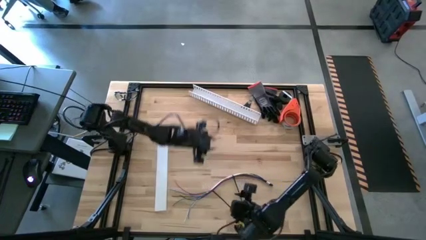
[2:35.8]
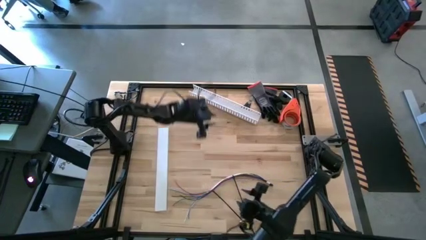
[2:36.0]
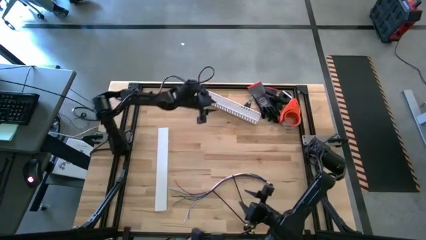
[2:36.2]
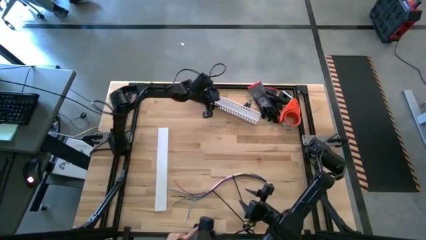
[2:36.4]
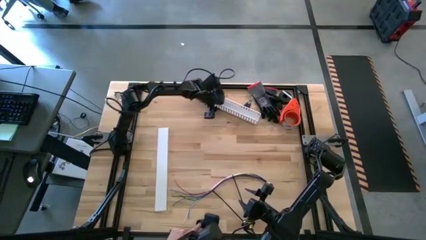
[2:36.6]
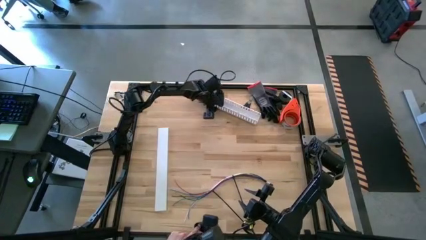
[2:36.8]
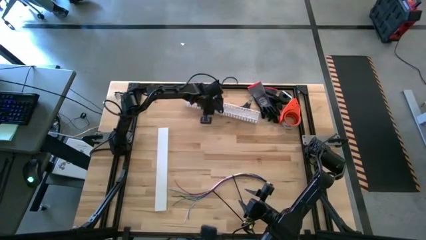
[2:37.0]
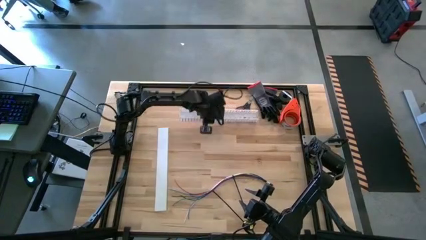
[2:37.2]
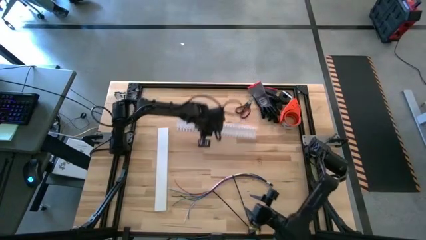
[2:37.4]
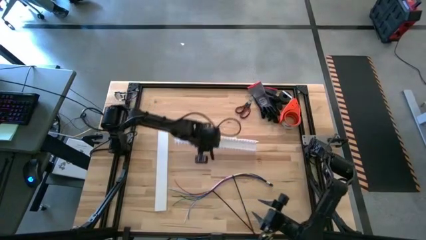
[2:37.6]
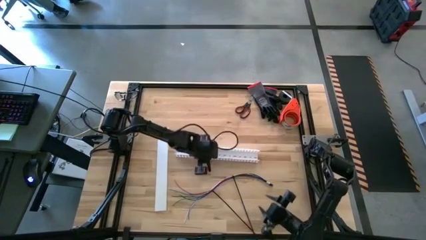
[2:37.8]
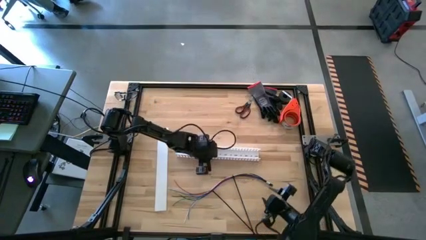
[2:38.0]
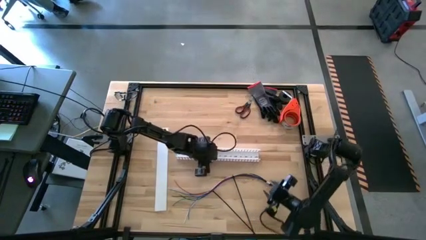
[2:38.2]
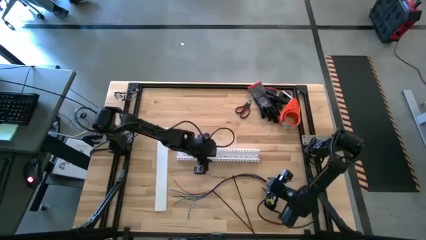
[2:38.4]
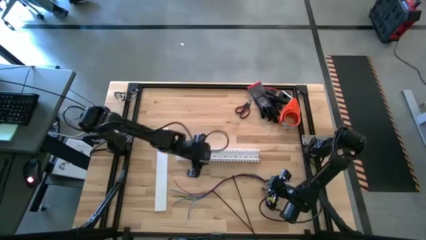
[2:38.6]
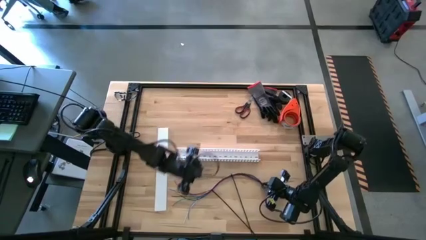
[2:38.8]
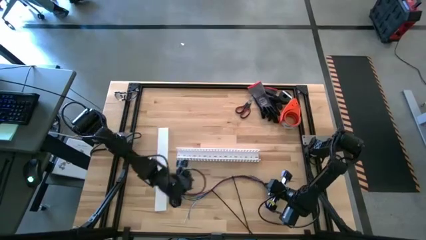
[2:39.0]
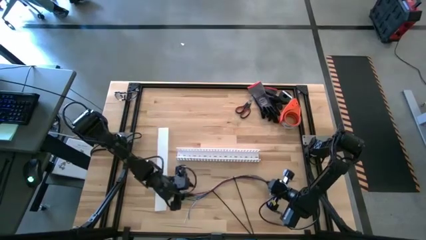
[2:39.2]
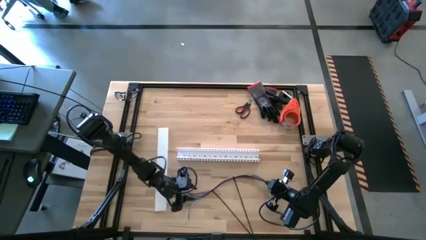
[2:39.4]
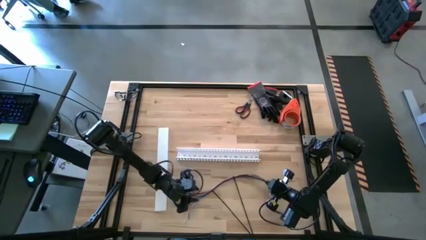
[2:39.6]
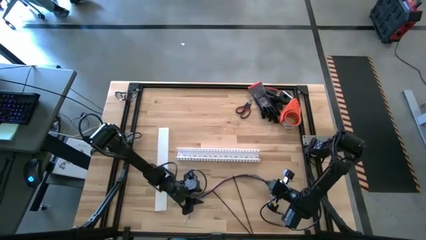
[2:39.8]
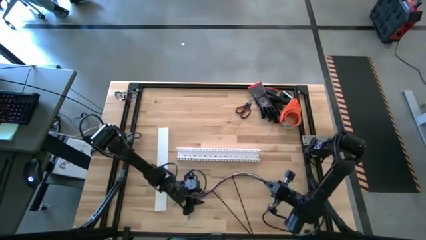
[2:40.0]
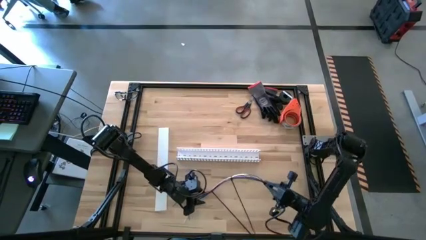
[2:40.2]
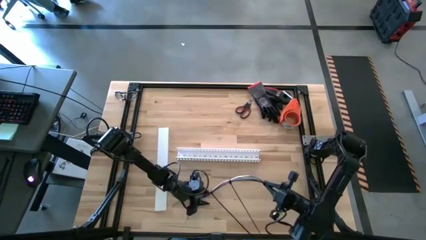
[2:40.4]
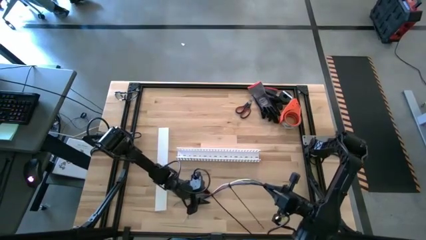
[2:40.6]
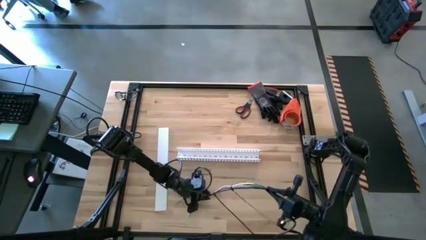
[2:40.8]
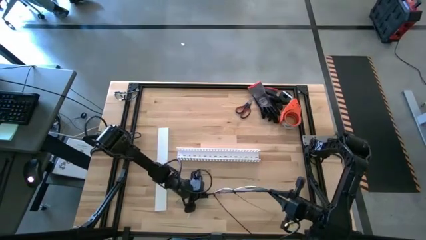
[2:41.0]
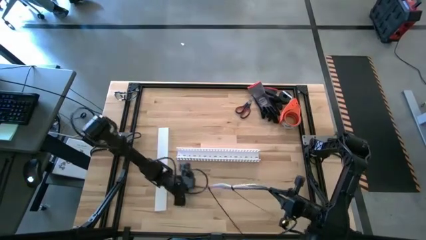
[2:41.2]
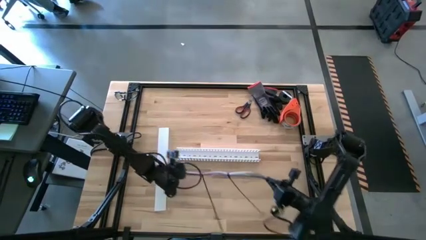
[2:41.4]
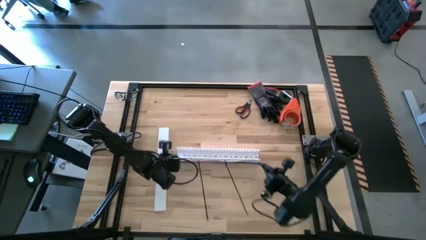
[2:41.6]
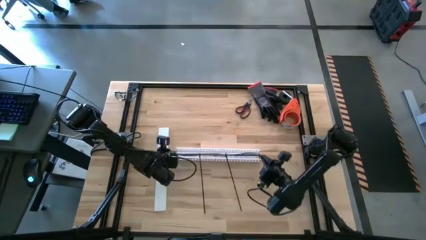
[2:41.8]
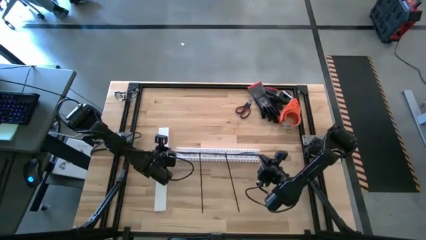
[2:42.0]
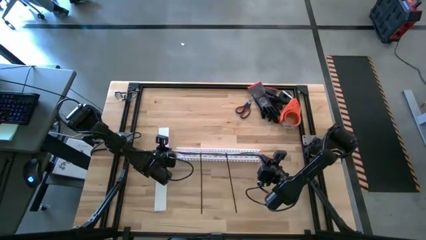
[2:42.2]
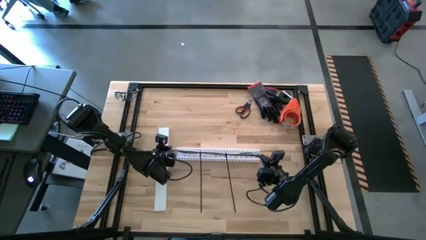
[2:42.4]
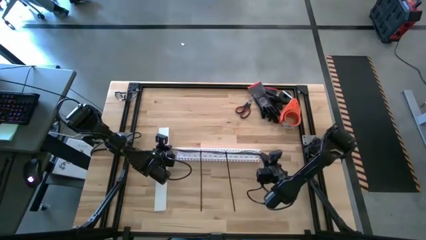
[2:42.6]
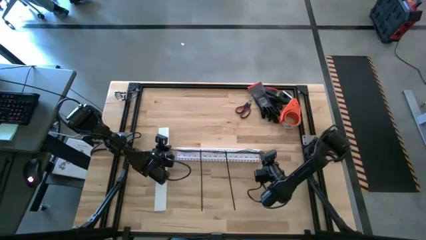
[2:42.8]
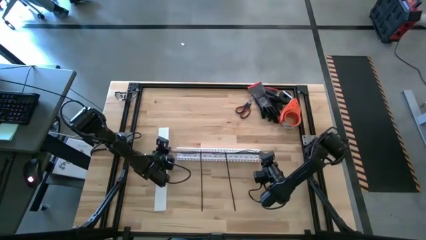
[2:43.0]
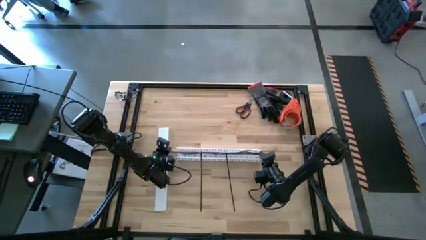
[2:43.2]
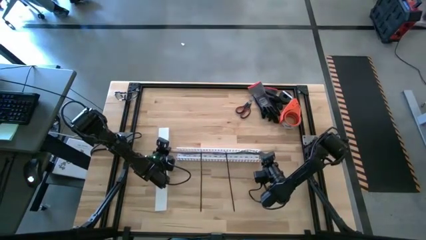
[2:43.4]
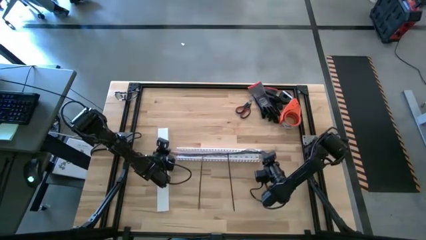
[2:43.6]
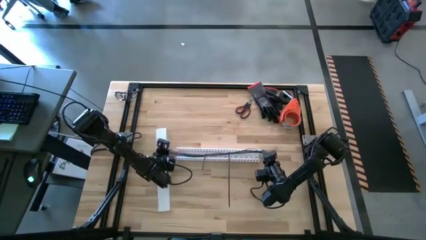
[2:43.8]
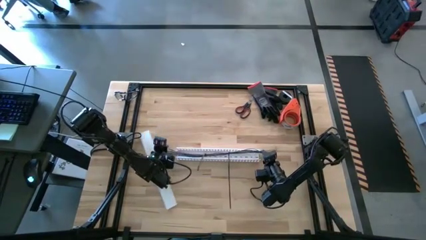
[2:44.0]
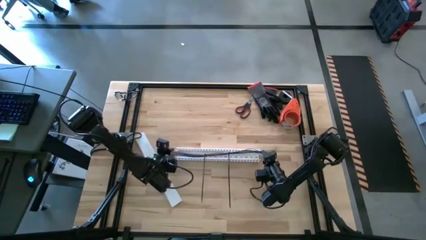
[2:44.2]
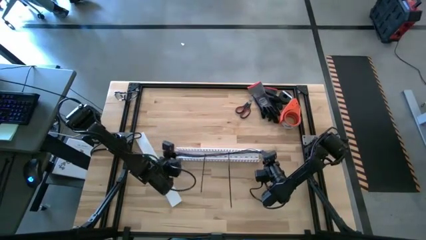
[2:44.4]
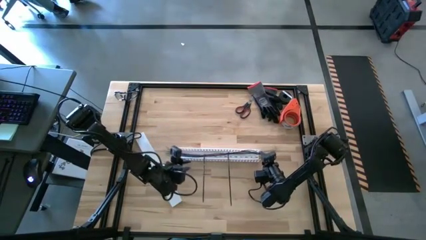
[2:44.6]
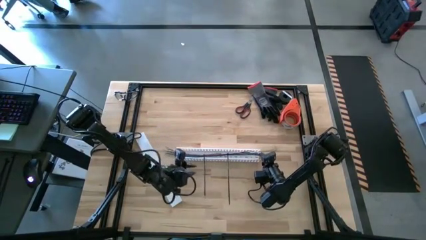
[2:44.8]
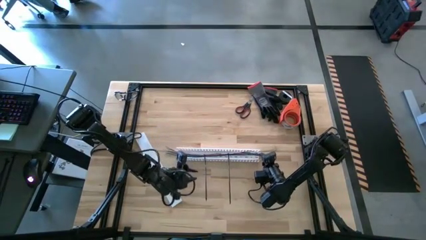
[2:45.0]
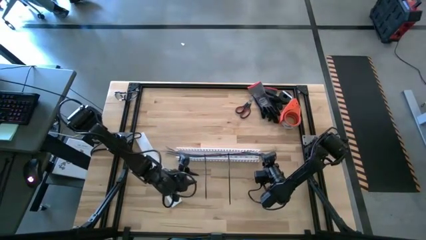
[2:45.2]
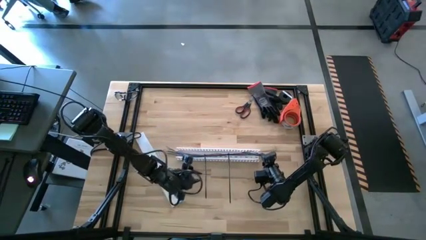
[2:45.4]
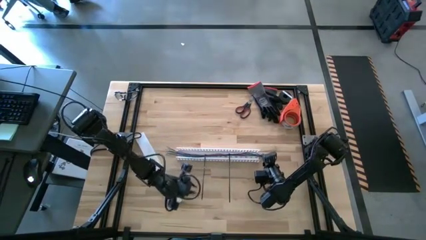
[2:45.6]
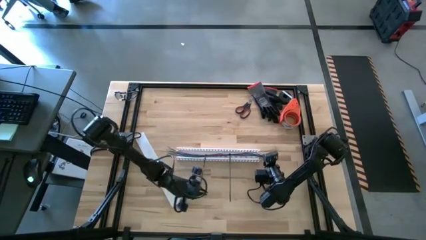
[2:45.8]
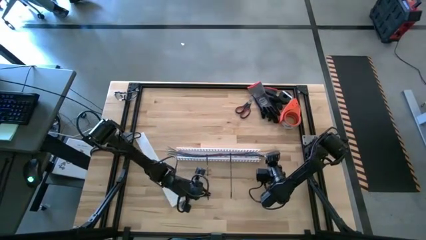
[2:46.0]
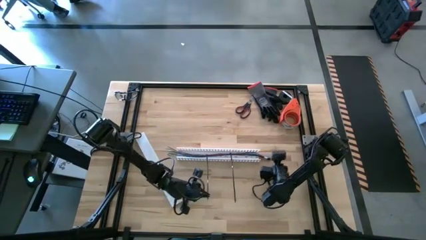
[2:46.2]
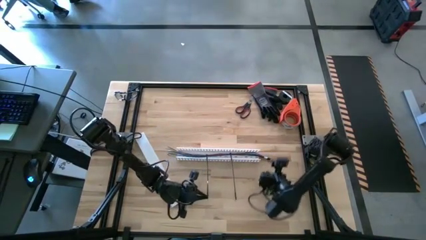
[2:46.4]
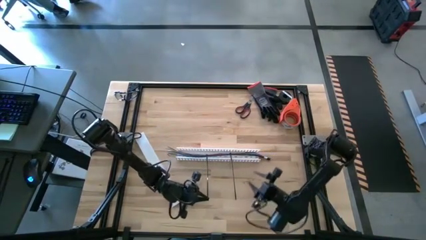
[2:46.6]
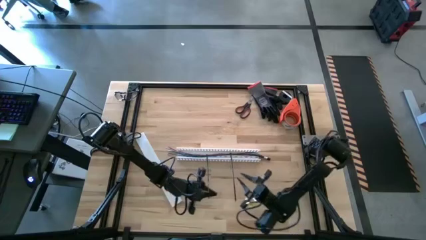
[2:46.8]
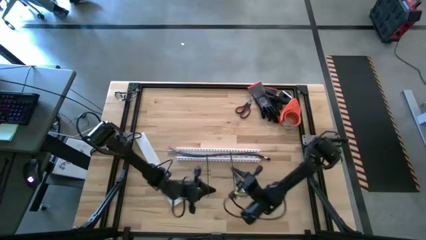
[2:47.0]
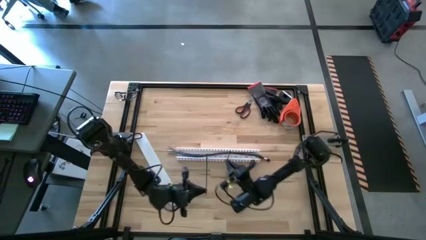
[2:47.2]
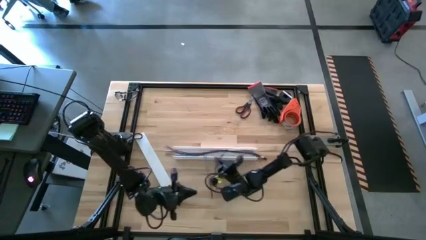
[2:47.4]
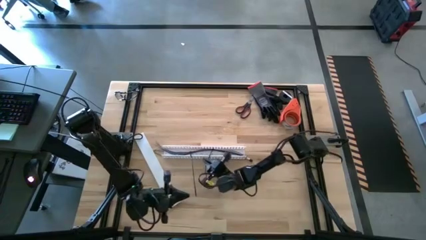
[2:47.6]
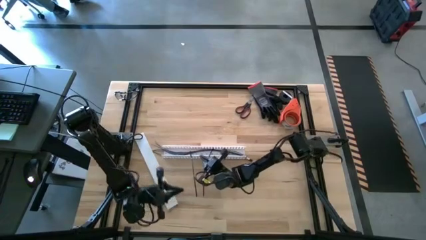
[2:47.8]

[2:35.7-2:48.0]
Task: Ziptie cables
Put the cable into the white cable duct

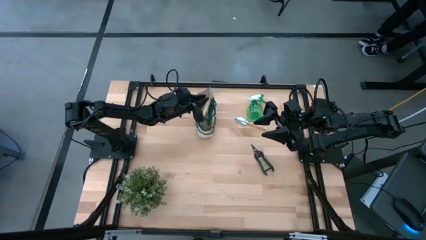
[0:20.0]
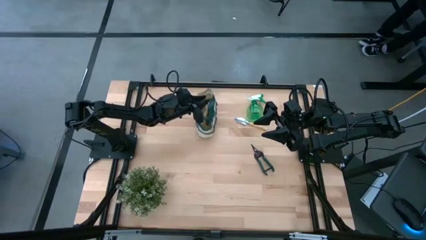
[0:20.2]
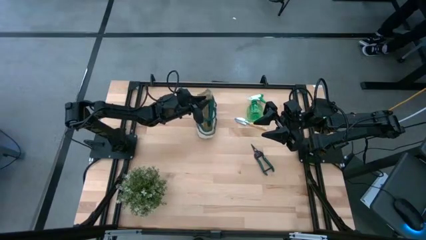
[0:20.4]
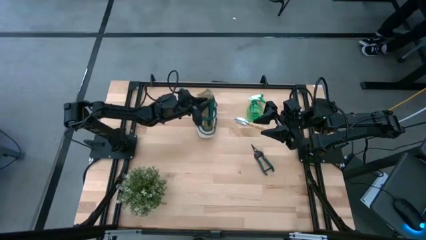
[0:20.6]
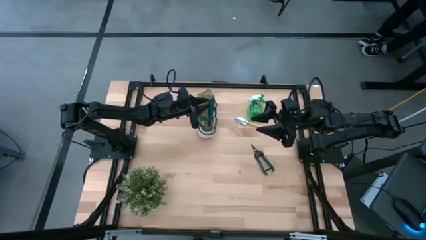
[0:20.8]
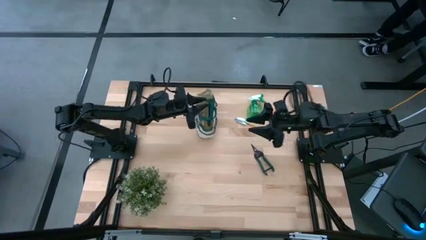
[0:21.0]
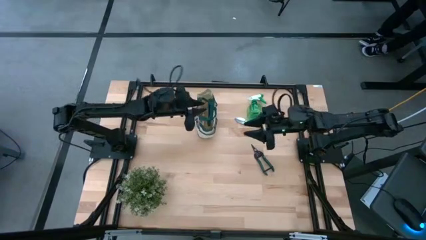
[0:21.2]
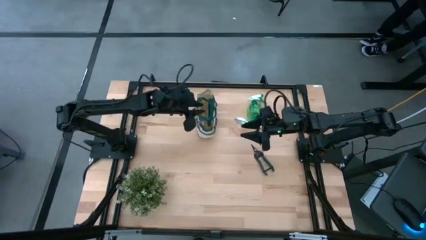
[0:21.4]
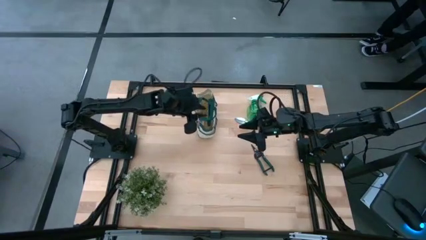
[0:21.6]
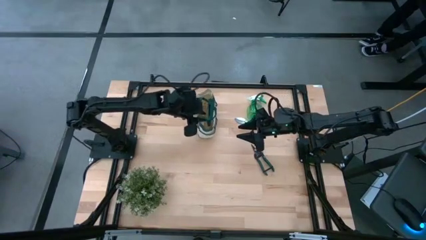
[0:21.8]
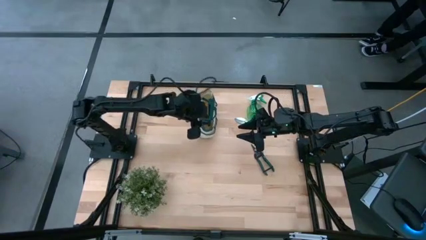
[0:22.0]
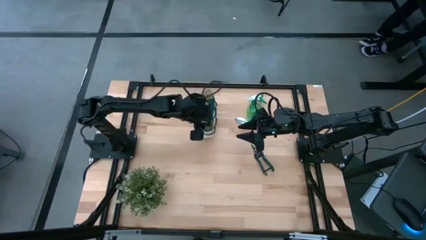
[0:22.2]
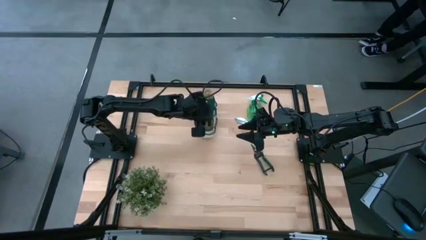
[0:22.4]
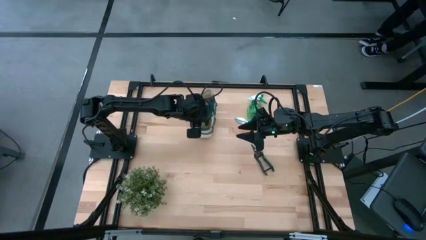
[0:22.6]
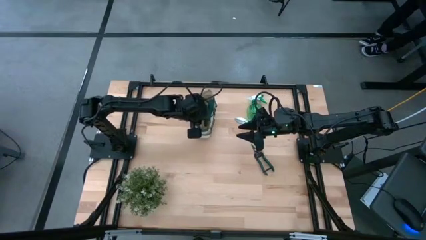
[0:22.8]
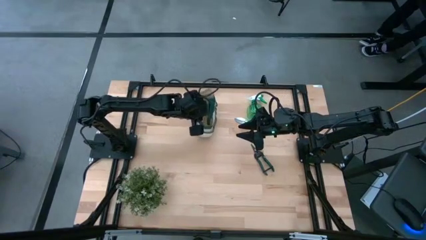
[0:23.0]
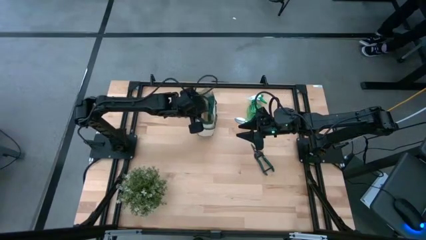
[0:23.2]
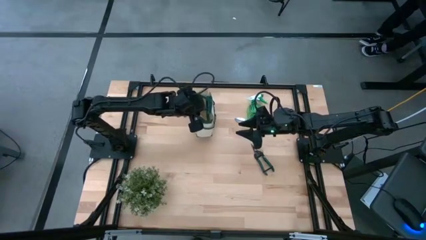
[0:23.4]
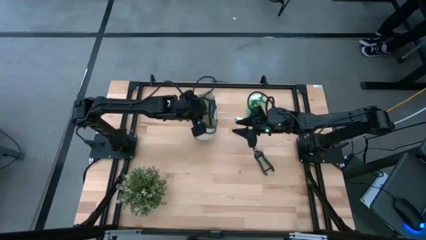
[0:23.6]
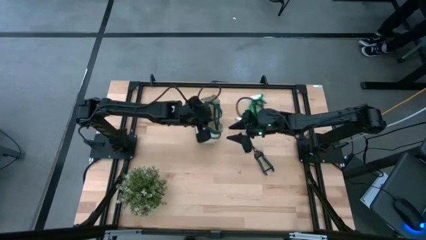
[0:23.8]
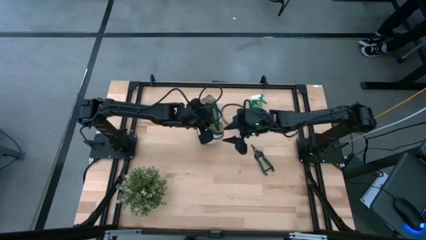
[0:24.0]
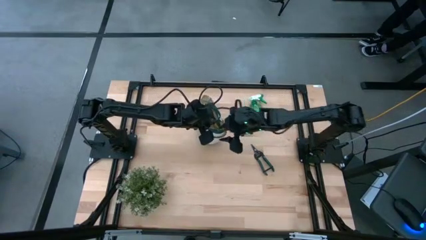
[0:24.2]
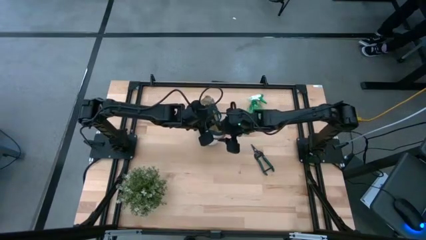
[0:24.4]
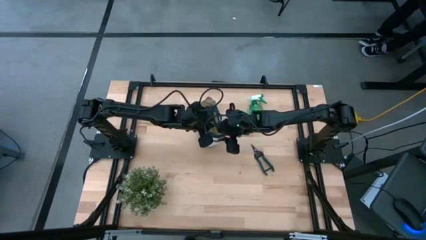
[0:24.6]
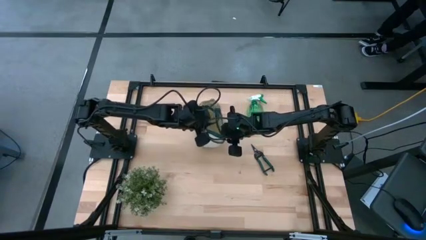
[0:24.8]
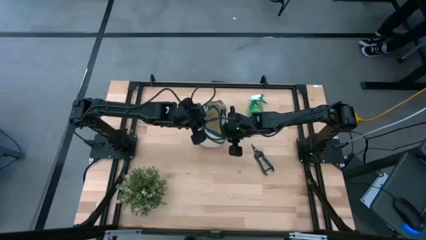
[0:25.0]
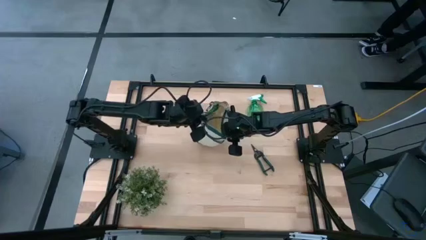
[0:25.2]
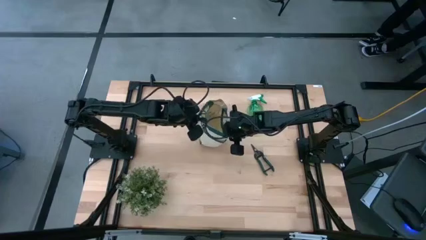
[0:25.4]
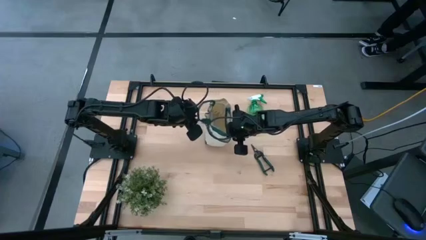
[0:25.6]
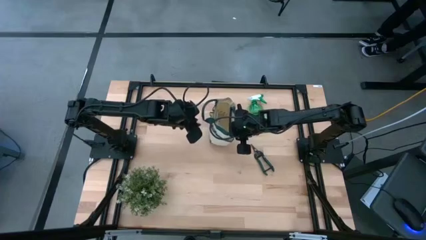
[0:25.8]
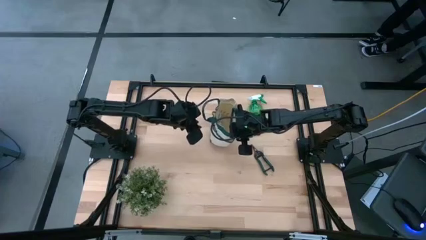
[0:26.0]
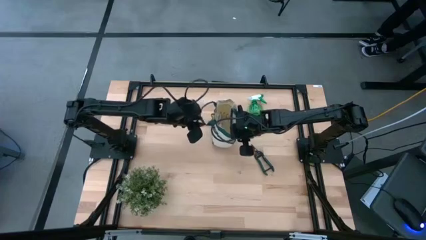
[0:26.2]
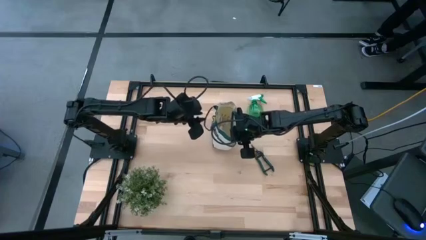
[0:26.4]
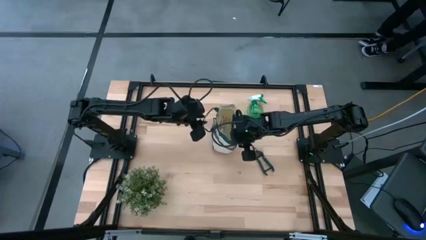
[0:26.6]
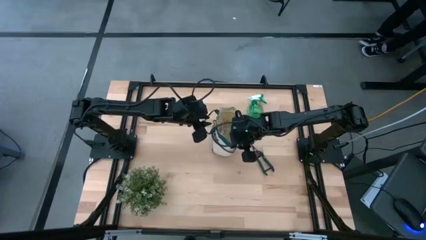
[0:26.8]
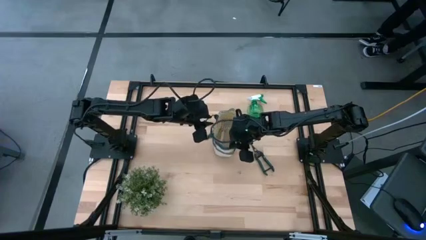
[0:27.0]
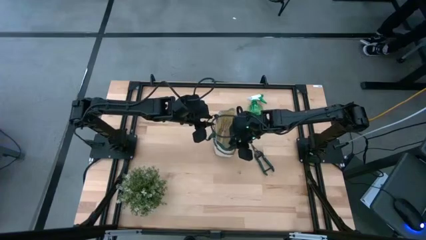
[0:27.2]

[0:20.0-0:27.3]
Task: Pick & Place Garden tools in Gardening bag
Move the gardening bag to the center of the table
